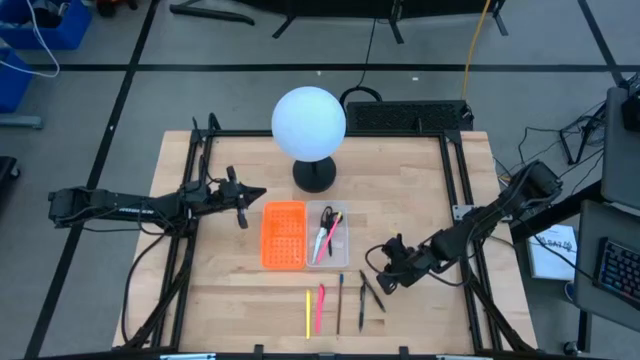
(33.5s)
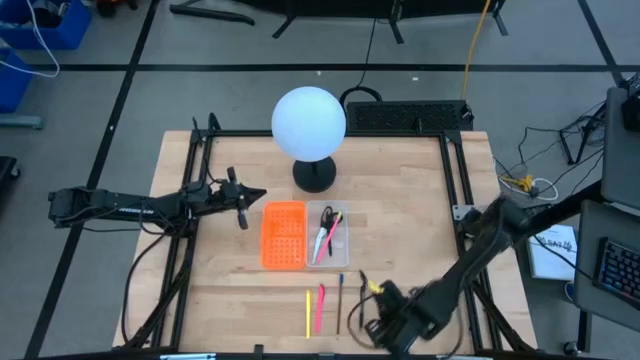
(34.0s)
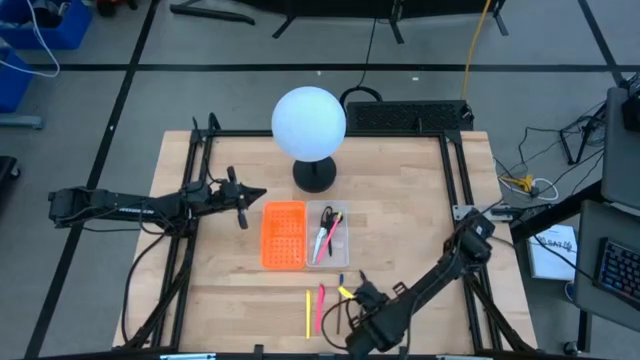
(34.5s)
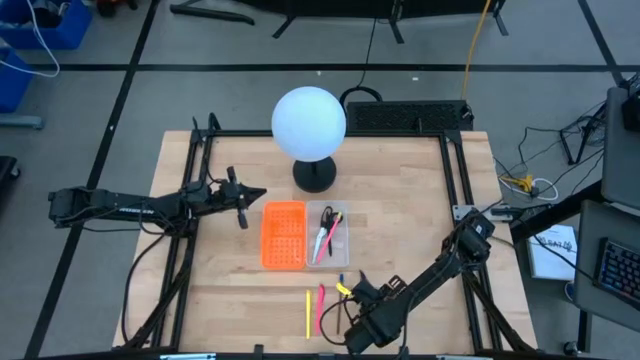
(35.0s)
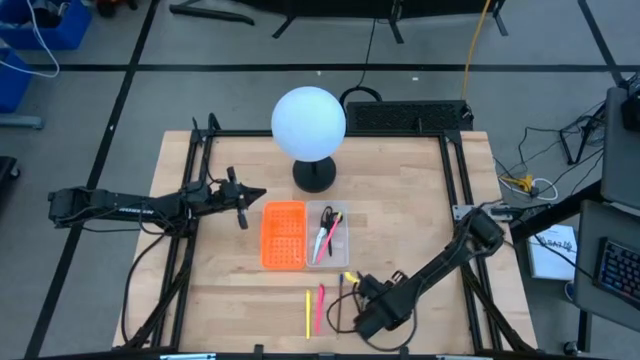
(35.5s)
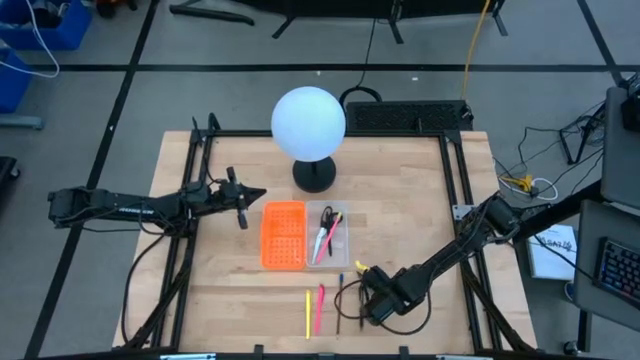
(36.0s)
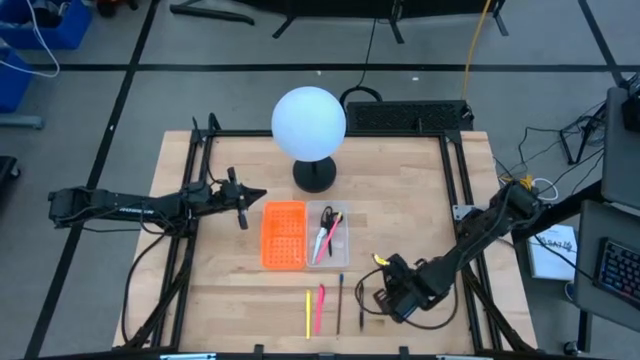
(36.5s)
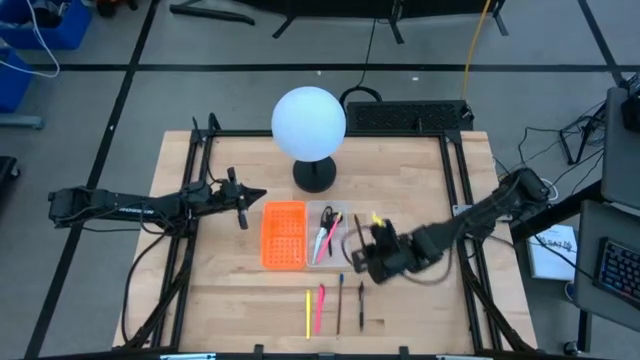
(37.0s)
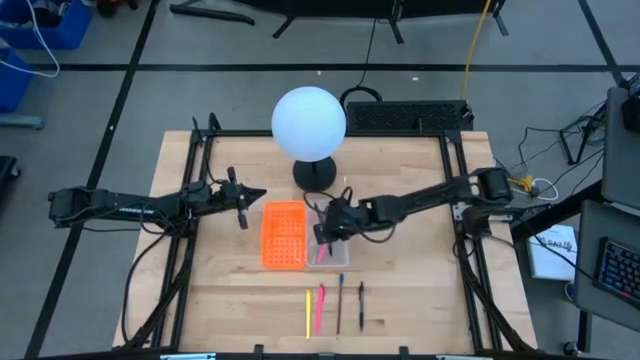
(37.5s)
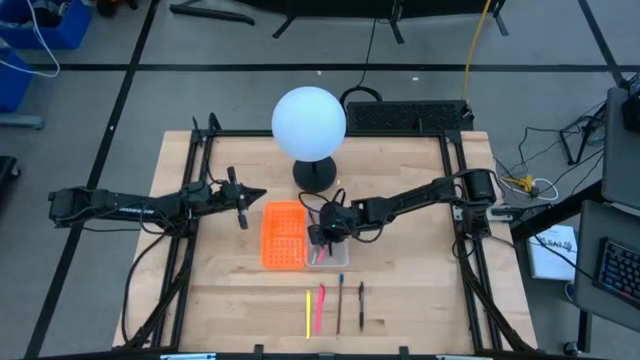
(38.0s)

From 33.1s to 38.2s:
Task: Pick & place school supplies into a supply box
Put the right black pen into the pencil box

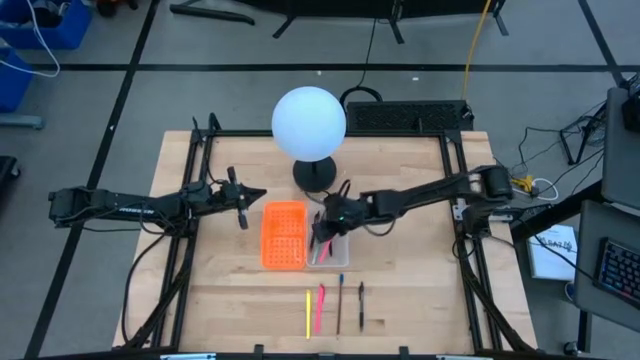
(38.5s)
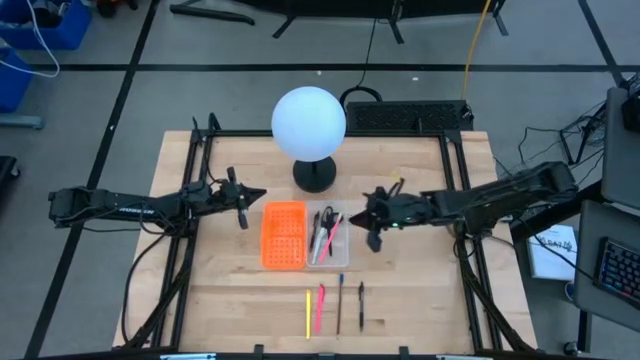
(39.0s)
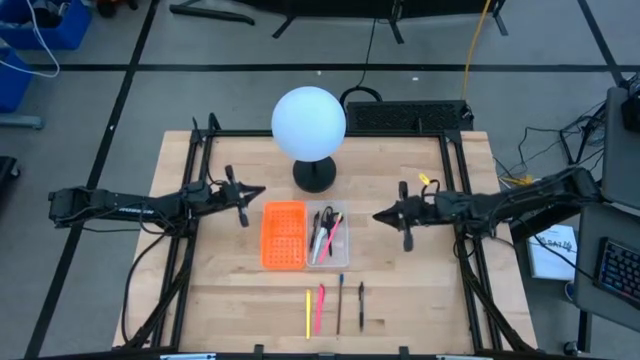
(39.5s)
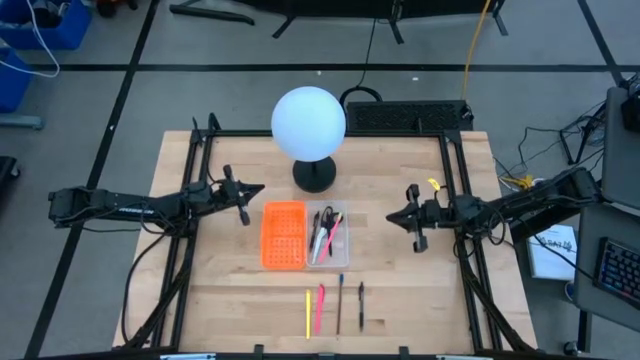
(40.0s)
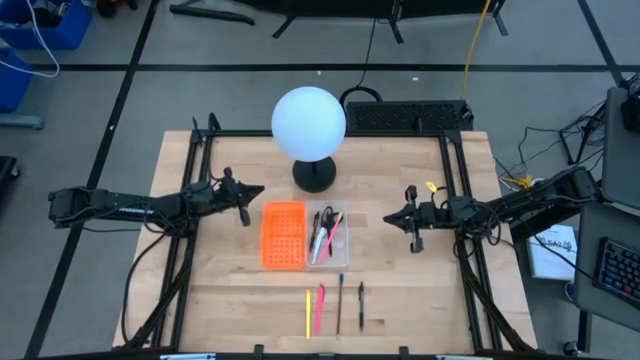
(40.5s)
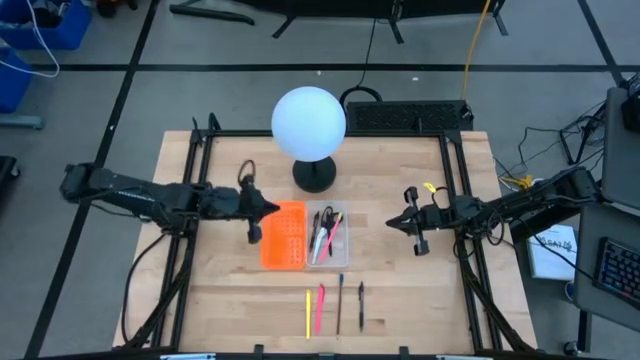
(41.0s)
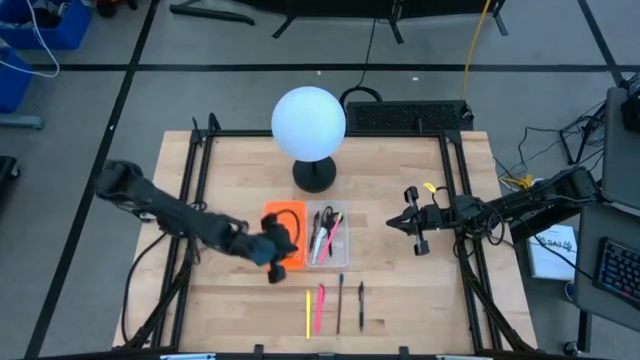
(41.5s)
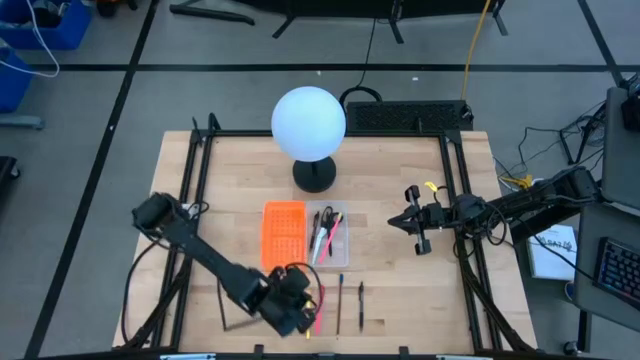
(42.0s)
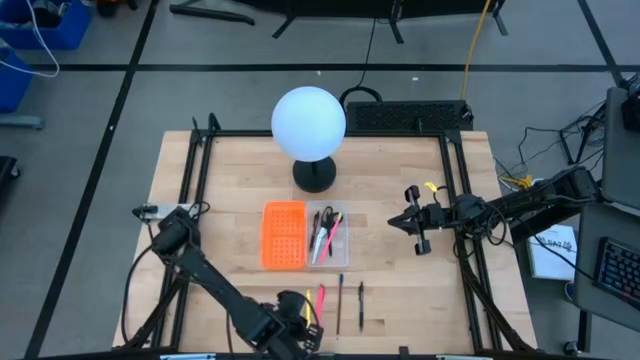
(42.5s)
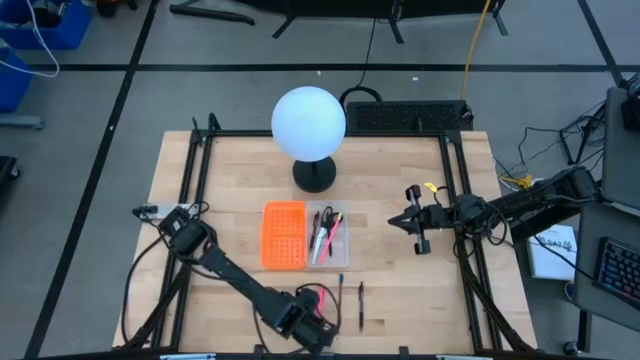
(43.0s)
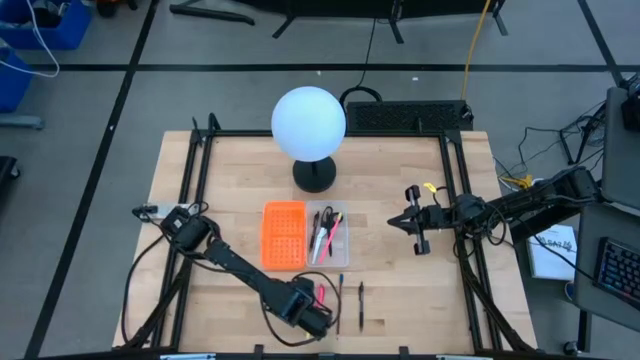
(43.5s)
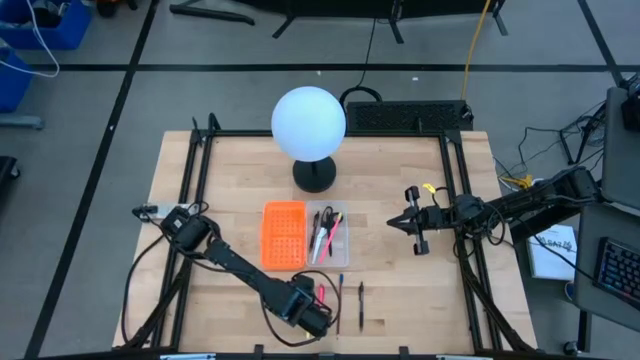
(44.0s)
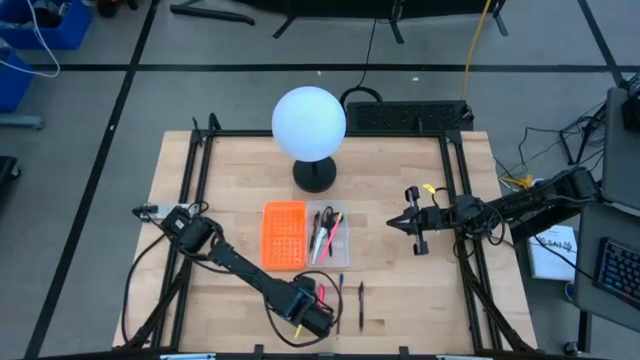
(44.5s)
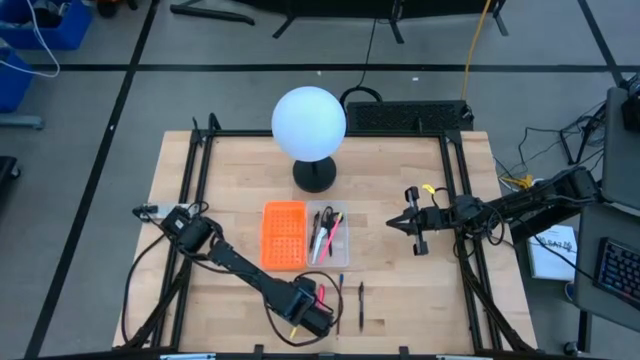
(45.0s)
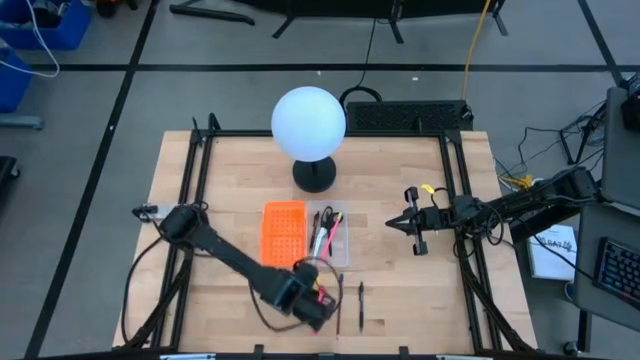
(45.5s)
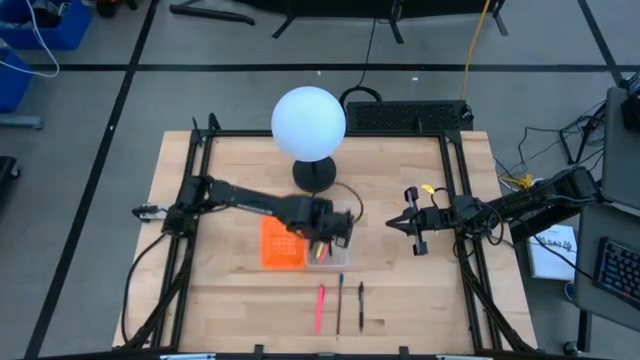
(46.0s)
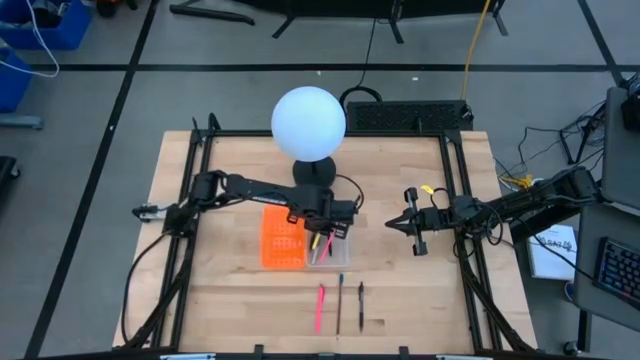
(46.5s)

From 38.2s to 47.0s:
Put the yellow pen into the pencil box

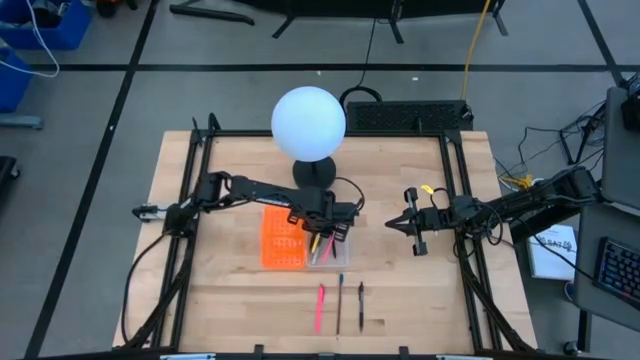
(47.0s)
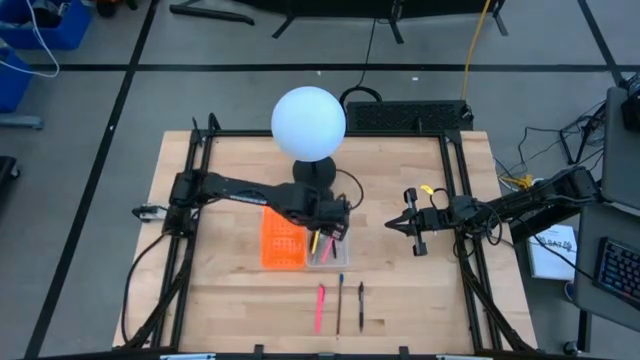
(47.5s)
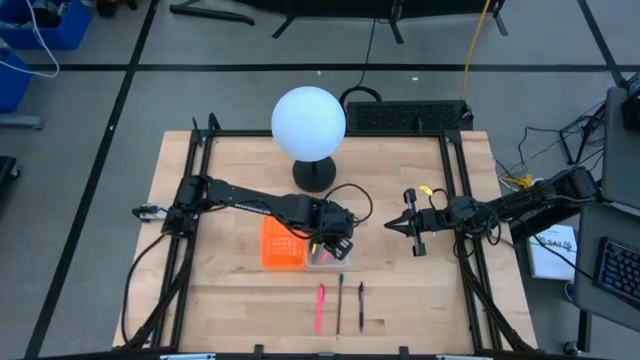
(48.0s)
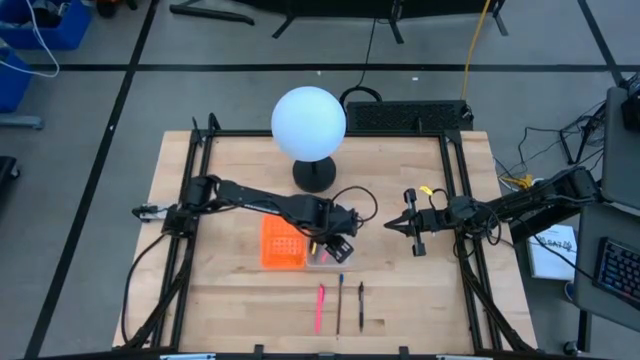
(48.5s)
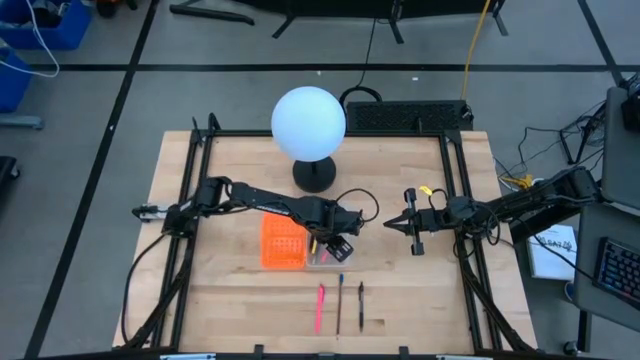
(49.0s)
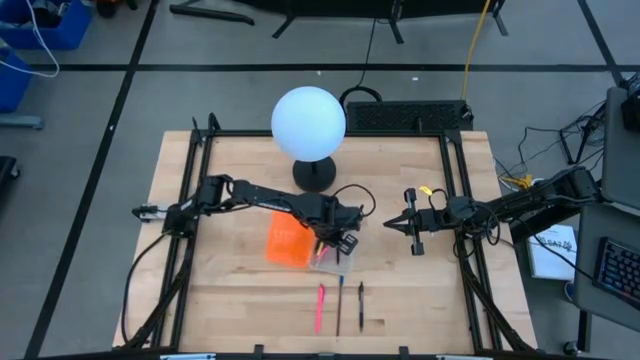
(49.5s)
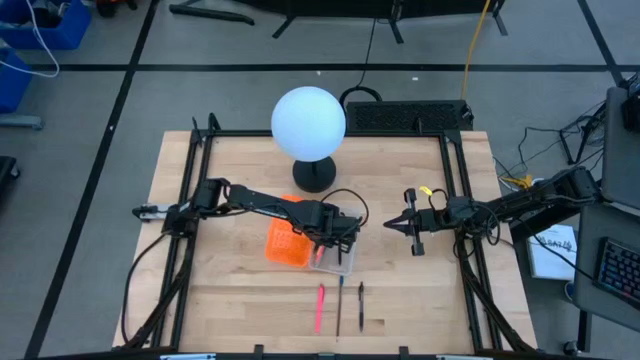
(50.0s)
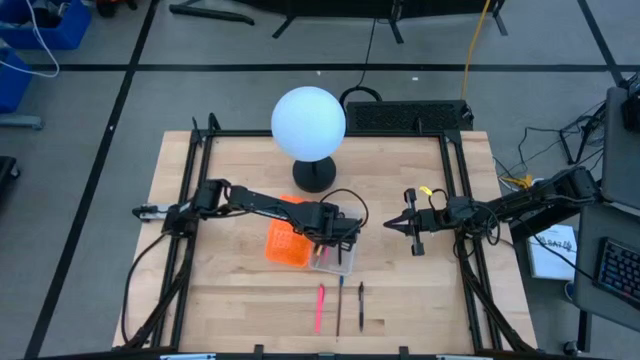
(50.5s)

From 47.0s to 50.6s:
Adjust the pink pencil in the pencil box

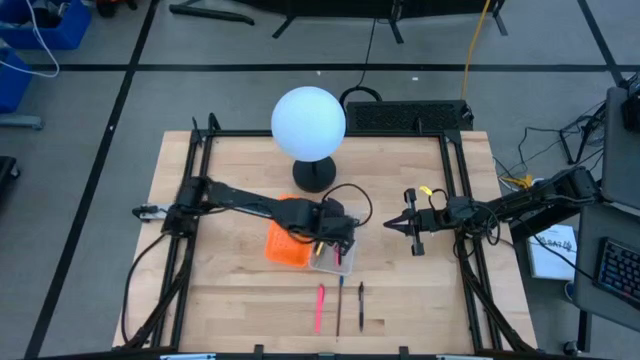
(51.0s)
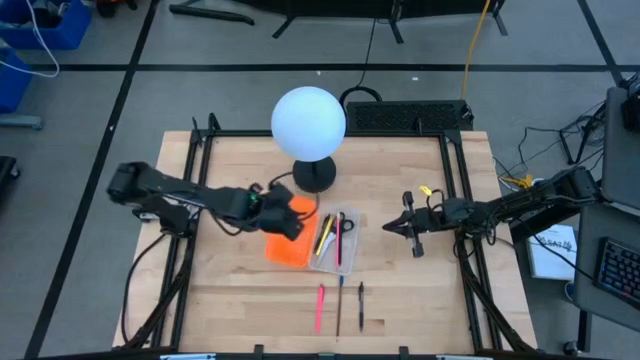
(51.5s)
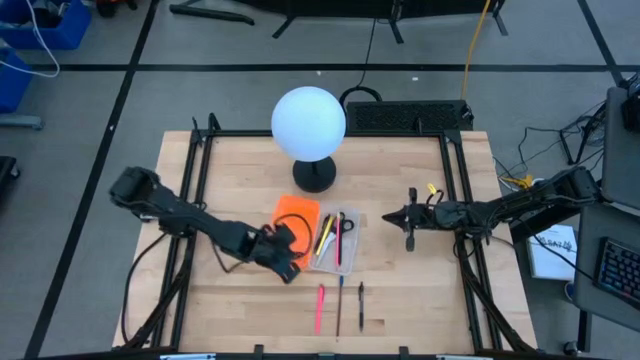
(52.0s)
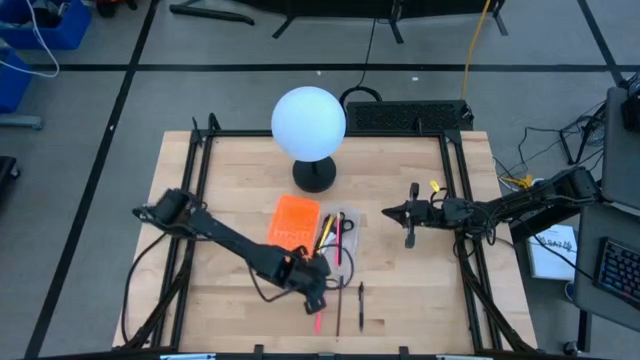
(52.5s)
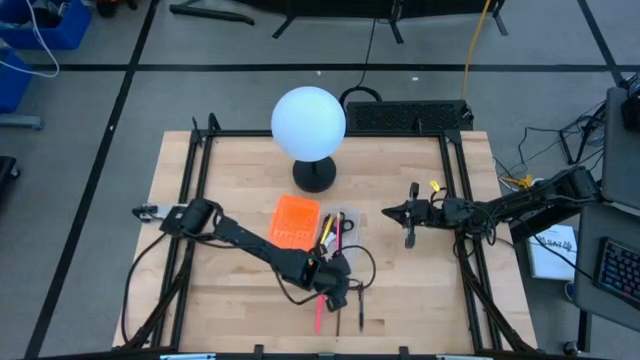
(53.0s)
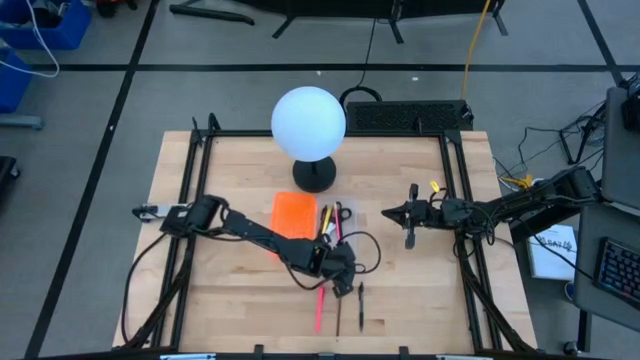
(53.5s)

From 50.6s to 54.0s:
Adjust the pencil box
